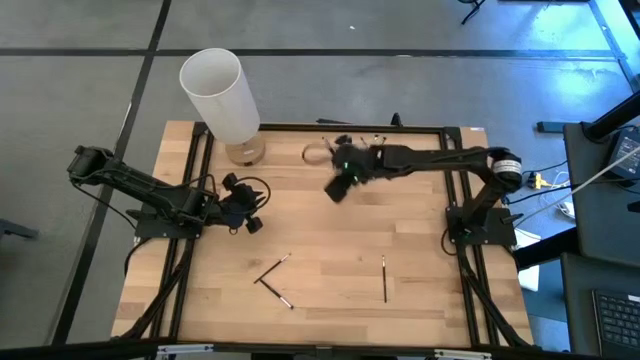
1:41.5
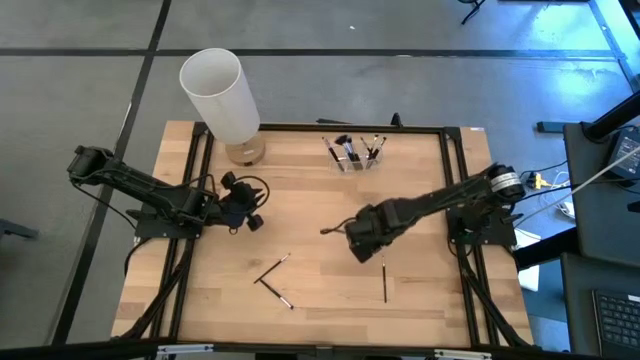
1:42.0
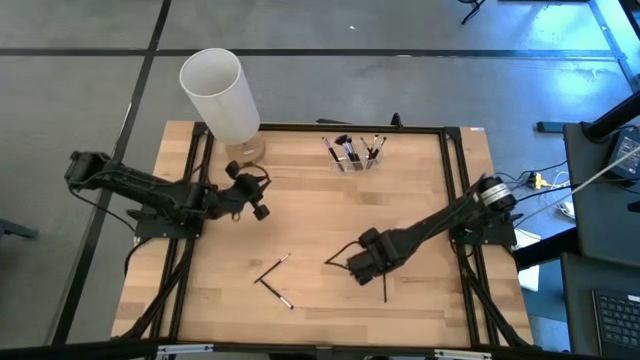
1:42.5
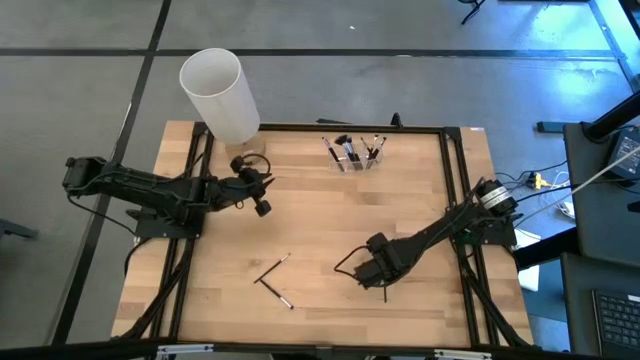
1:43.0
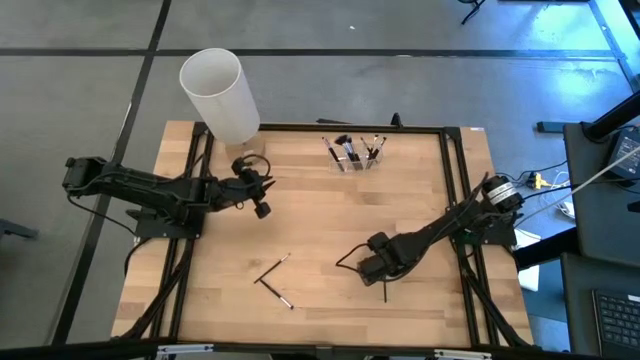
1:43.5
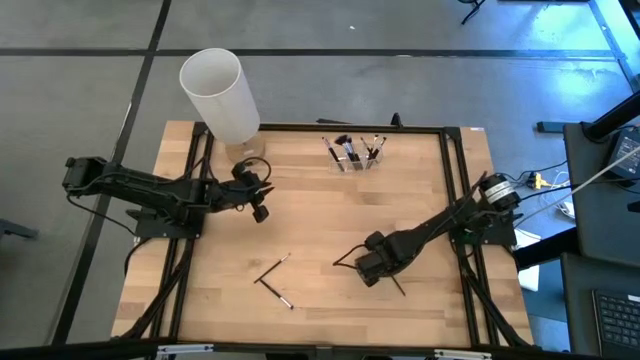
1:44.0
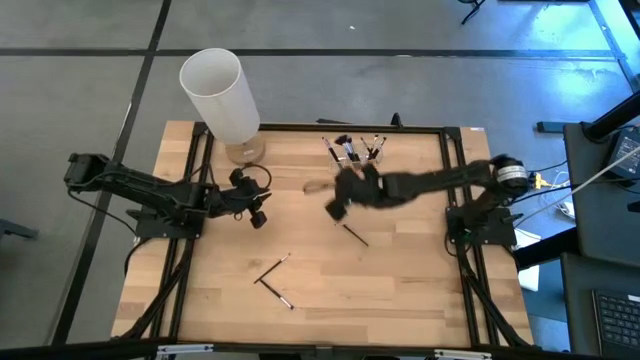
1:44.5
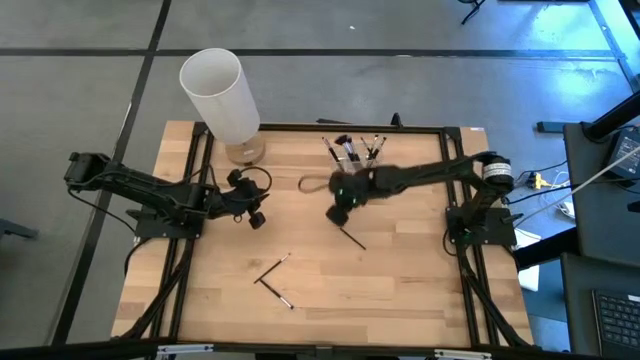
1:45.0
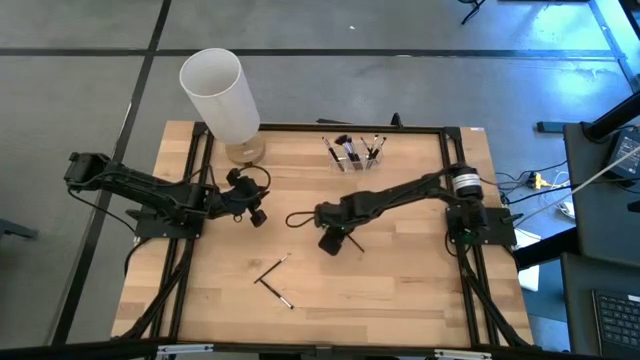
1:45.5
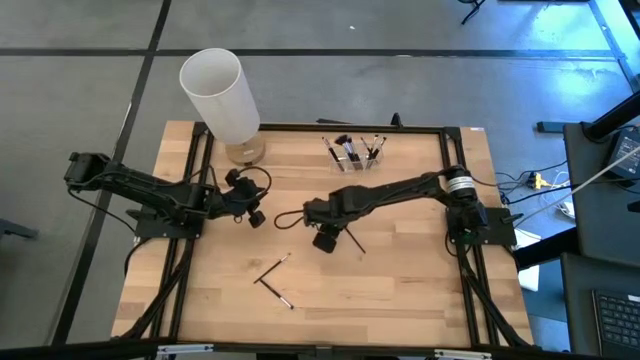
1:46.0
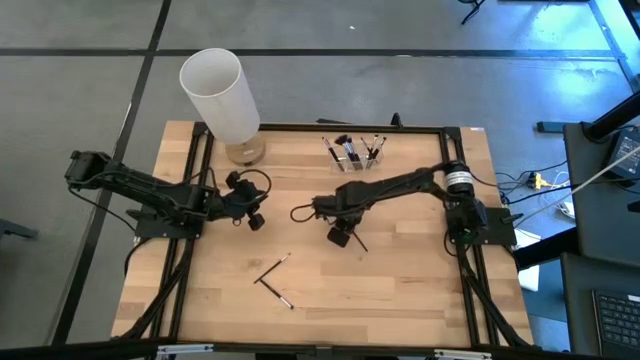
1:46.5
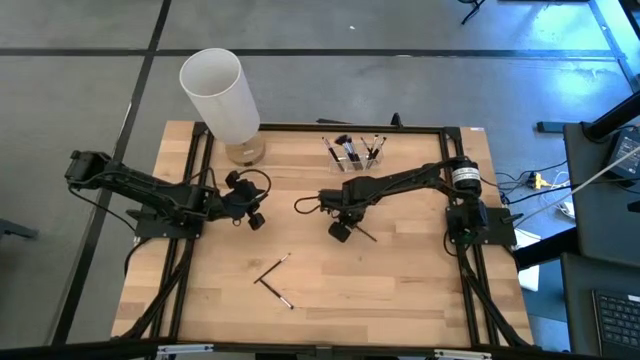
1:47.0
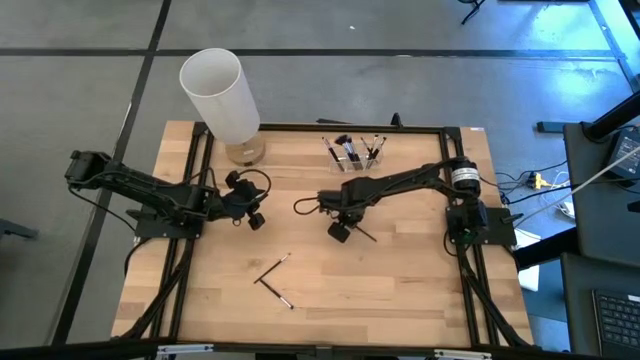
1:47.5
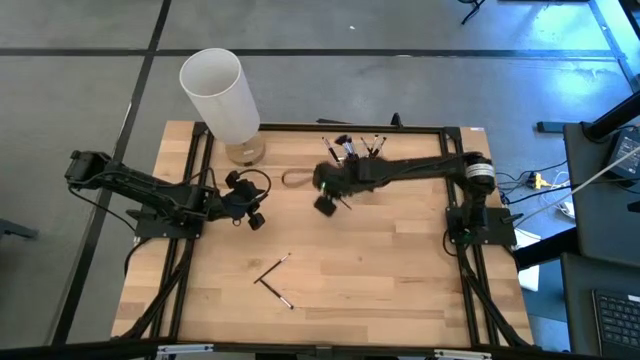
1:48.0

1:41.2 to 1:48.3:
Task: Put items in baskets/containers
Put the black eyeshadow brush into the transparent organizer

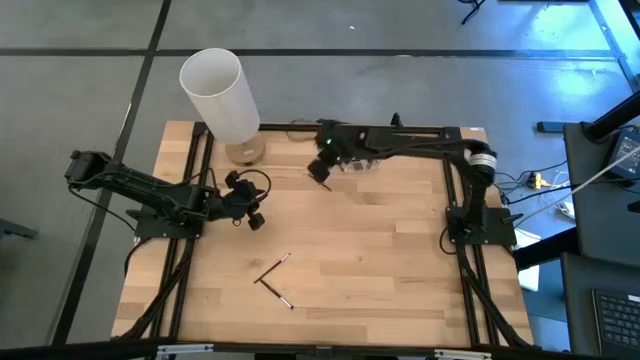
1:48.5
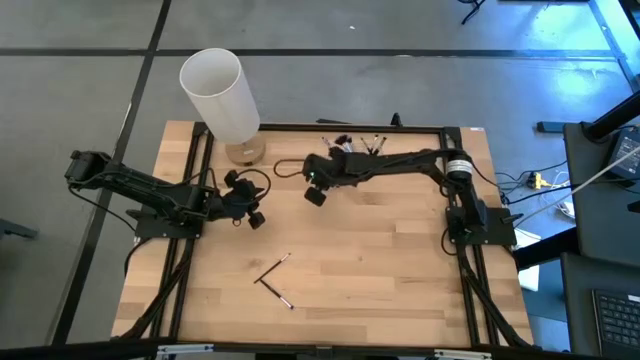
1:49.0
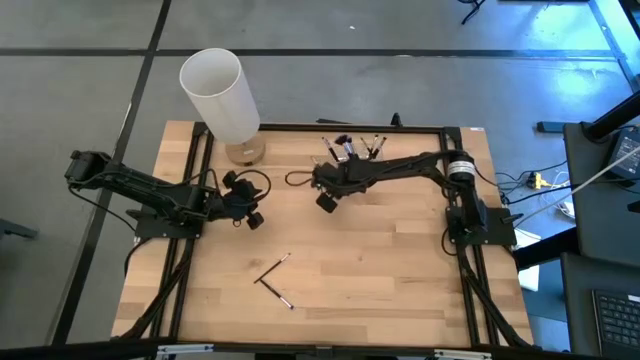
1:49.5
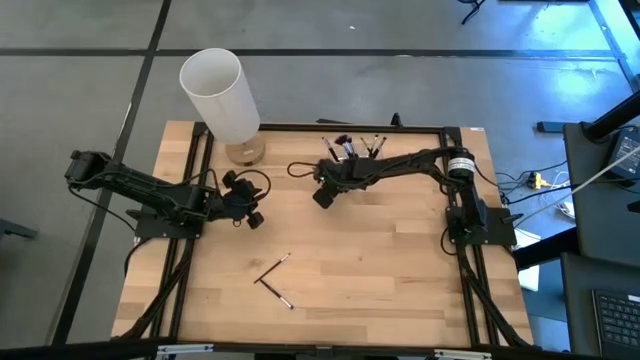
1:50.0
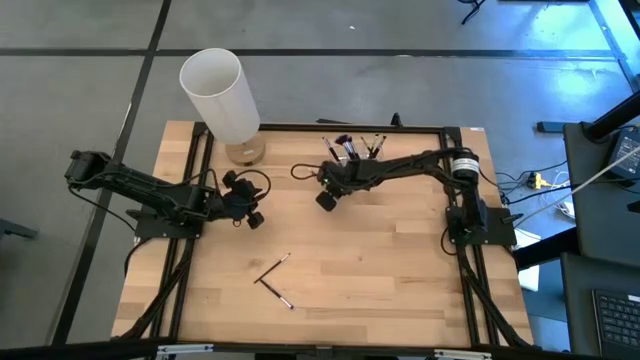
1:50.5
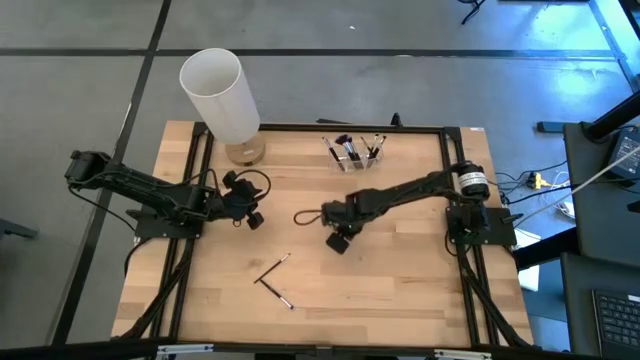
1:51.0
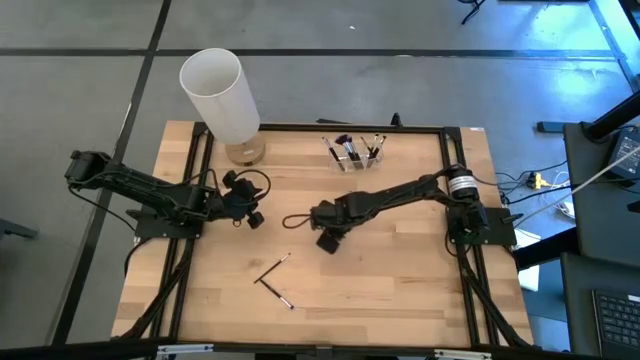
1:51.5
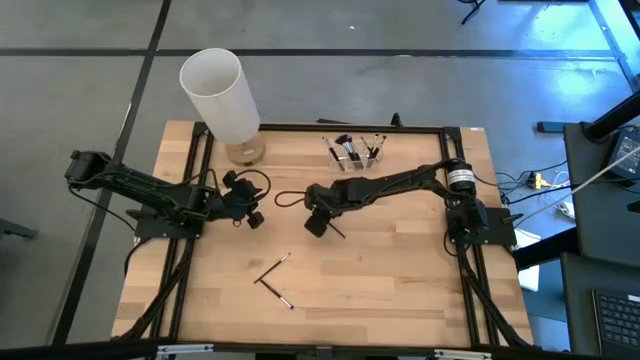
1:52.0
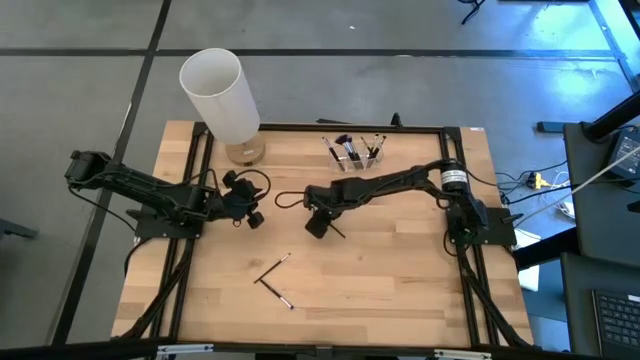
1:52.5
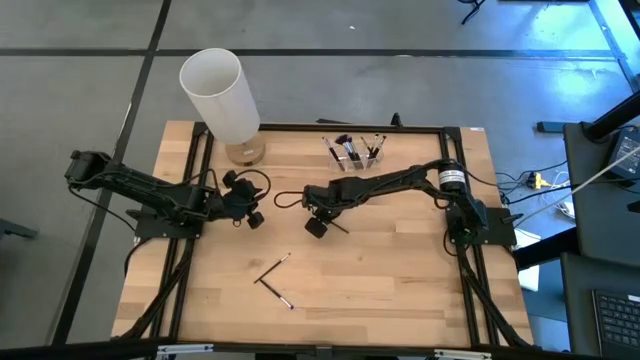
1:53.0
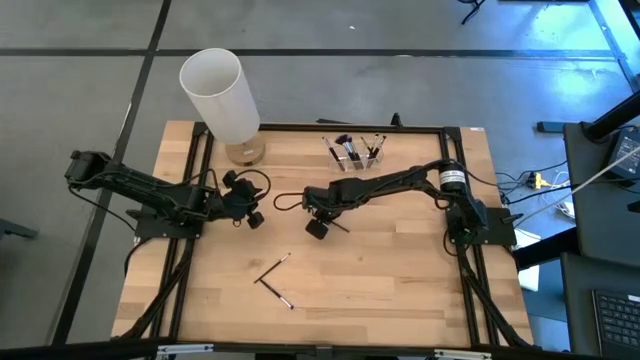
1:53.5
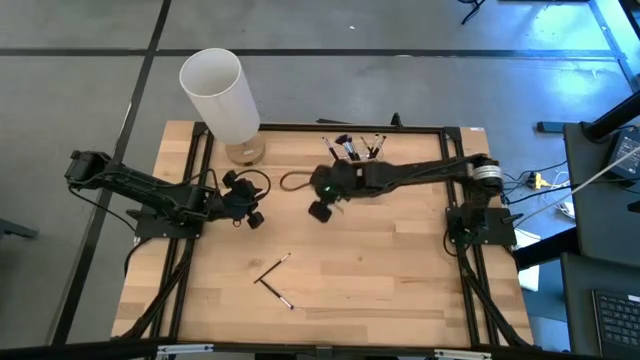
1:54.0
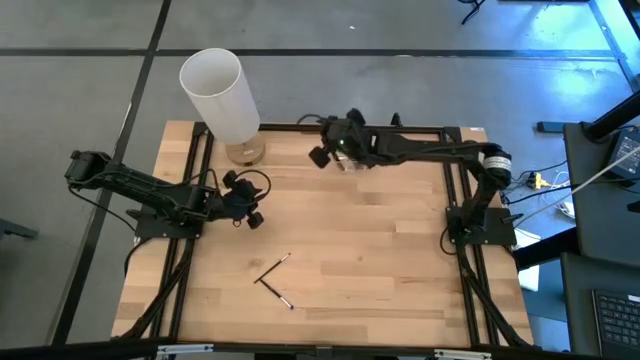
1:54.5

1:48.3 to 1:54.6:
Put the black eyeshadow brush into the transparent organizer

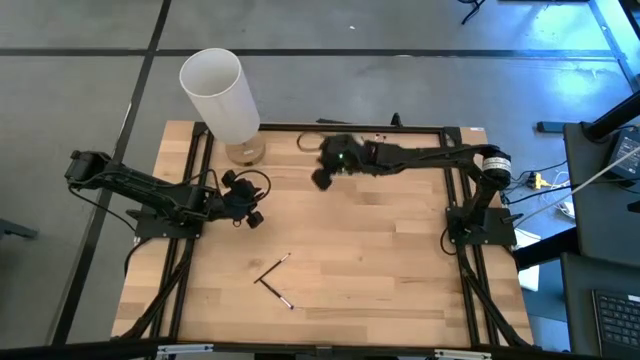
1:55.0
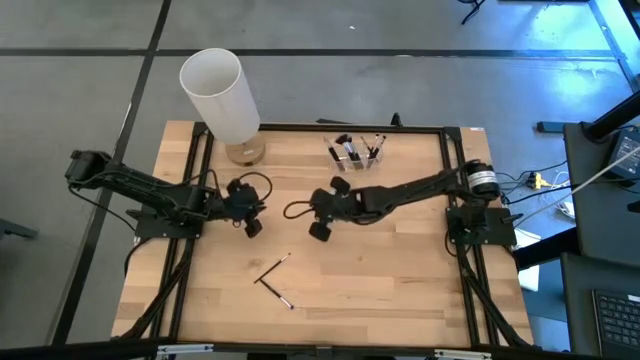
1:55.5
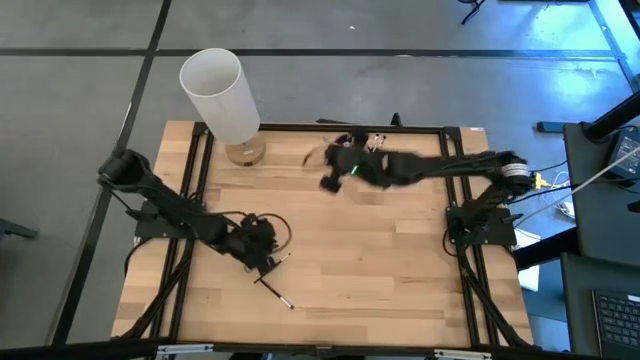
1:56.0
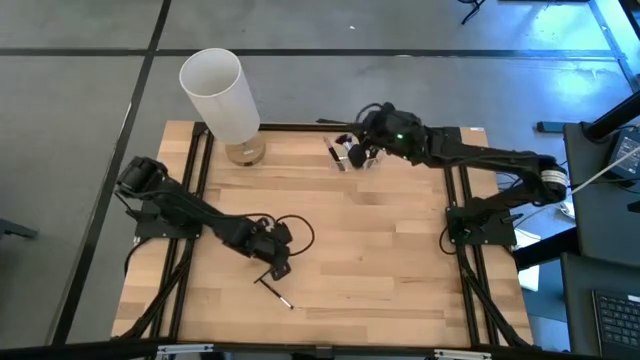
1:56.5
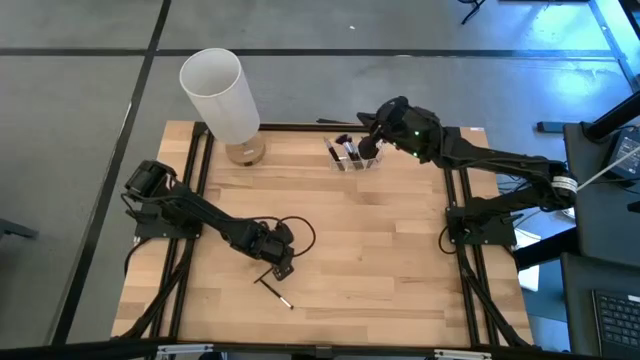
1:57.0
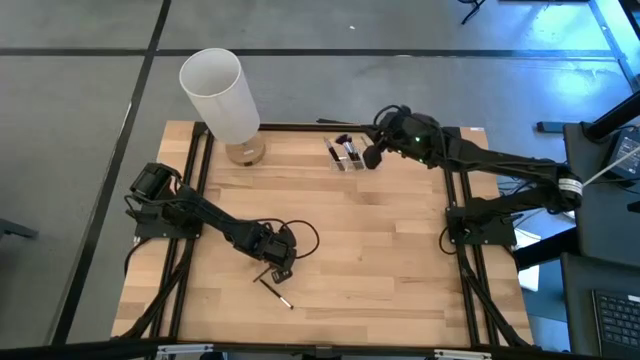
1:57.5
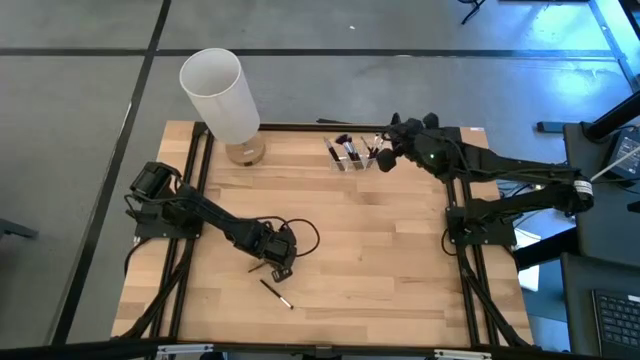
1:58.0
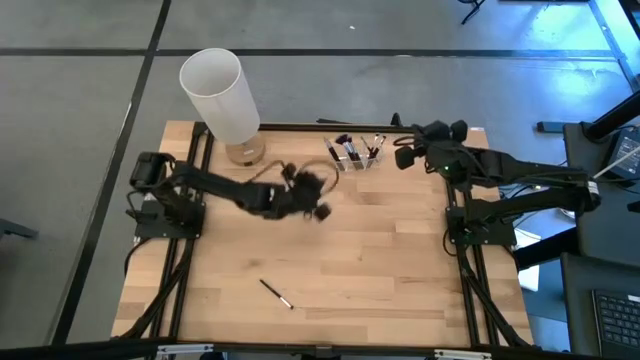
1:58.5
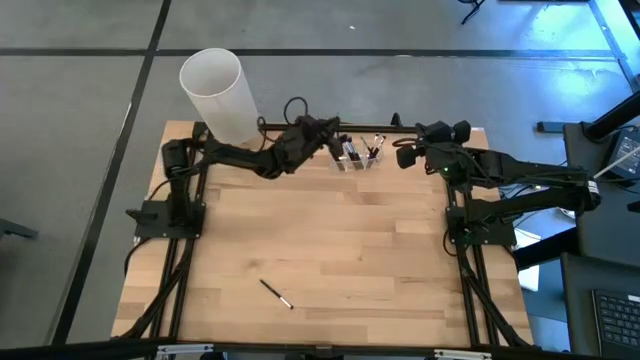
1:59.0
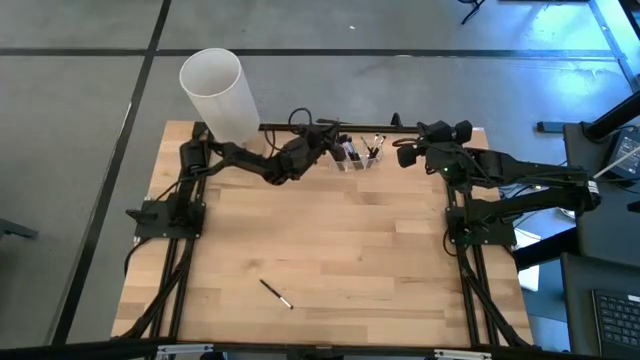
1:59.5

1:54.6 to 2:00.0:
Put the black eyeshadow brush into the transparent organizer

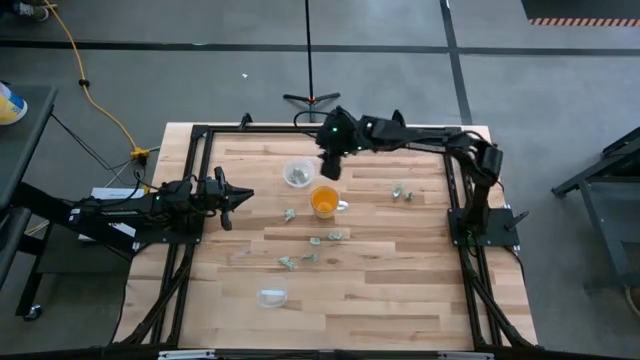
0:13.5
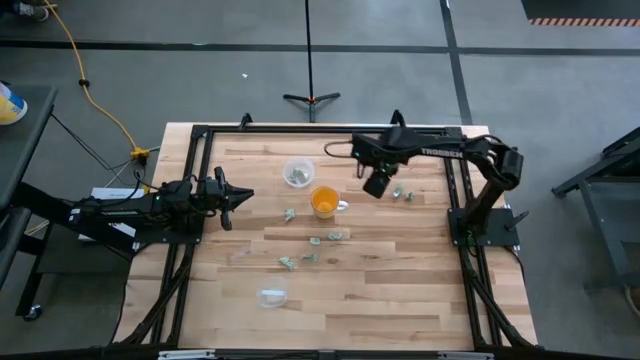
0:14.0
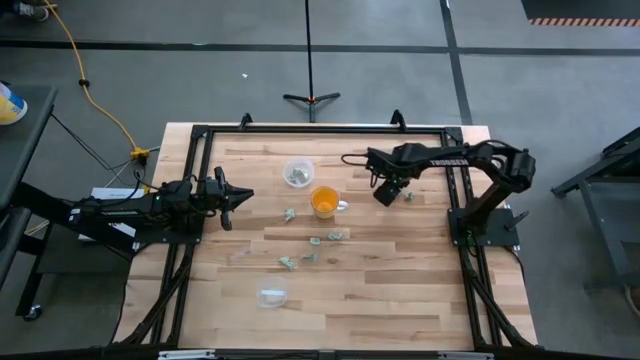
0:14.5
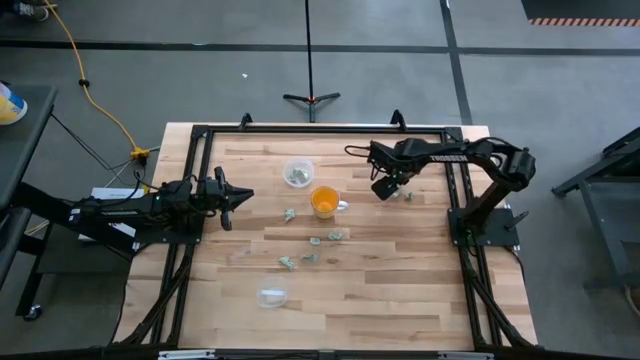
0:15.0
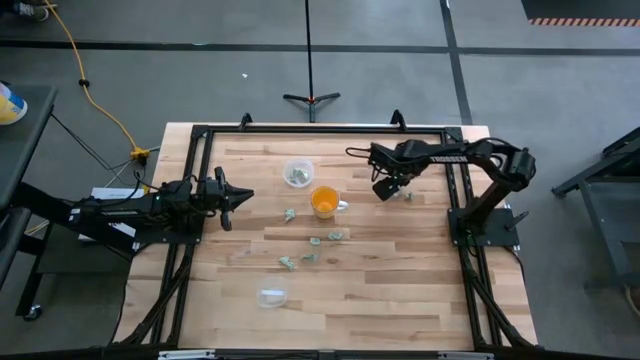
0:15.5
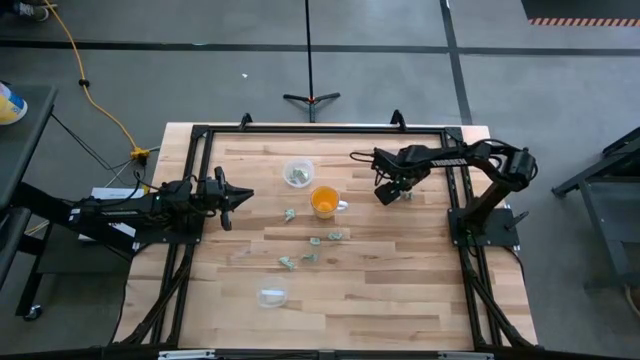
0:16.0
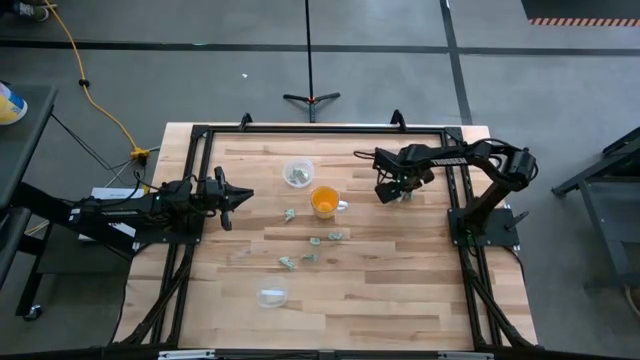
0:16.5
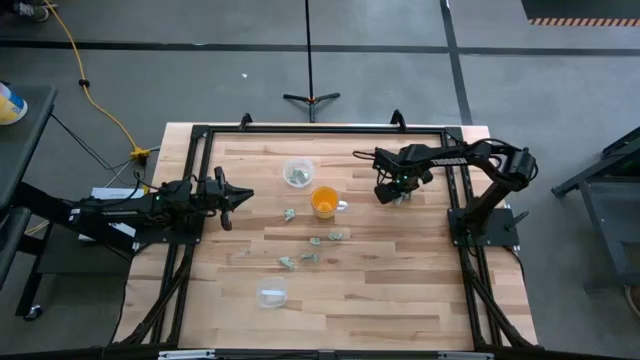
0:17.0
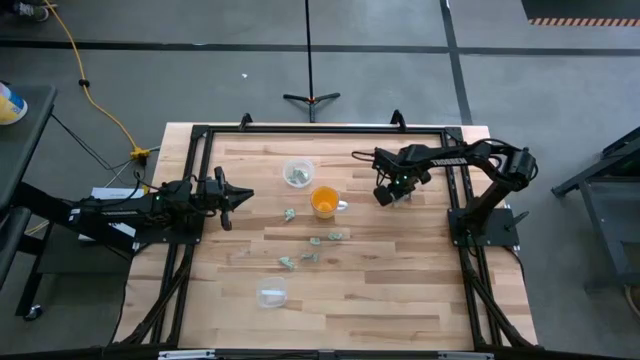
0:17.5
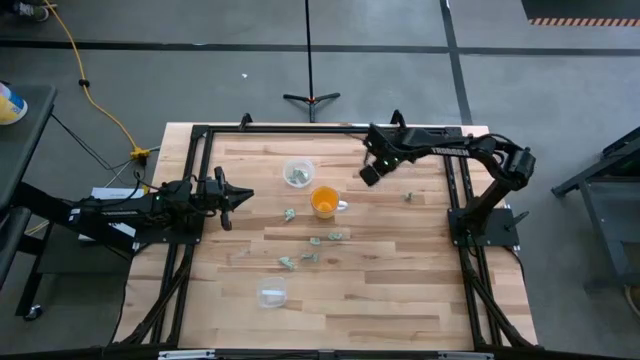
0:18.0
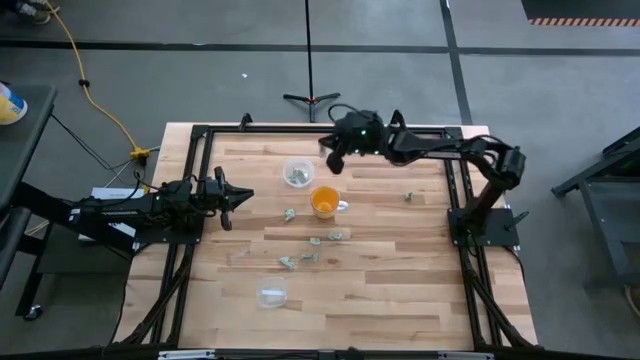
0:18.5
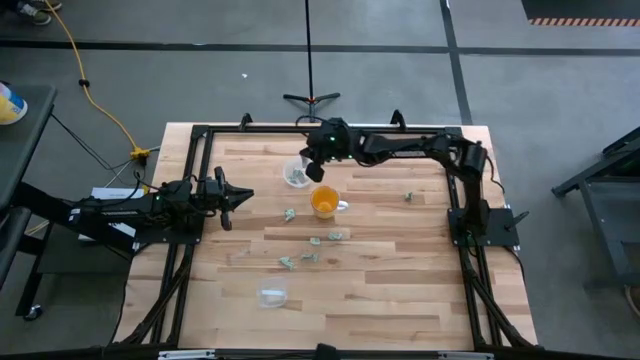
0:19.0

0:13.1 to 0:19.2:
Task: Pick and place items into bin
Put the light green stevia packet into the top transparent bin
